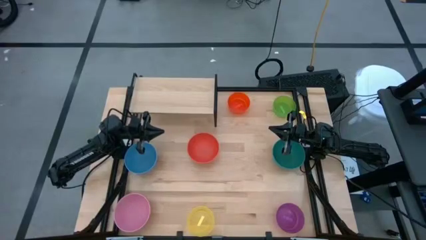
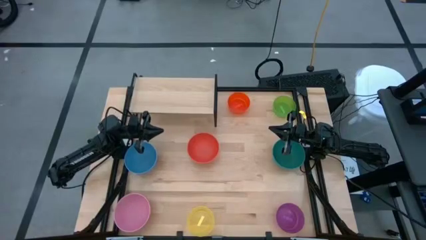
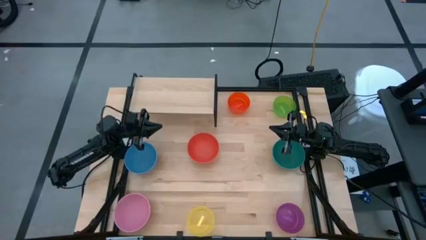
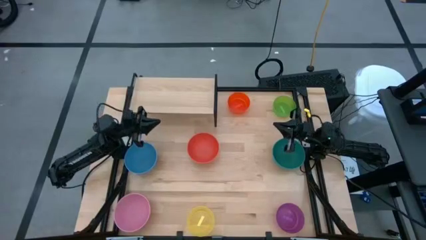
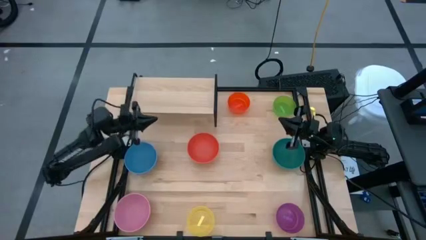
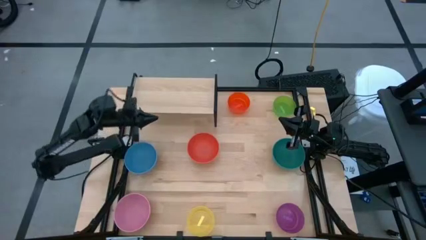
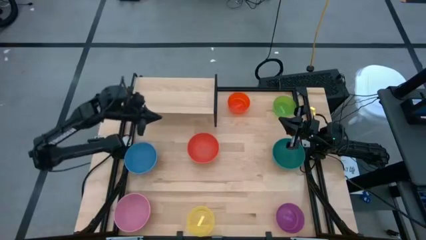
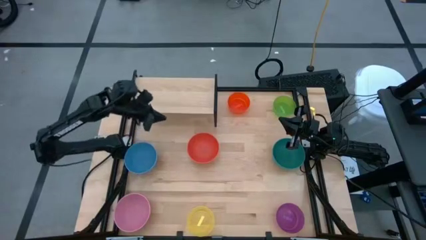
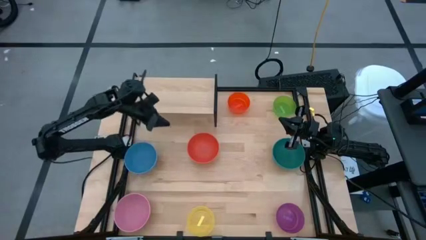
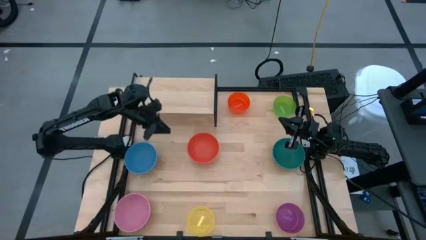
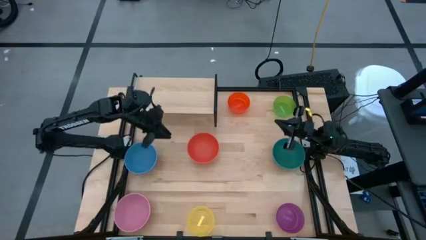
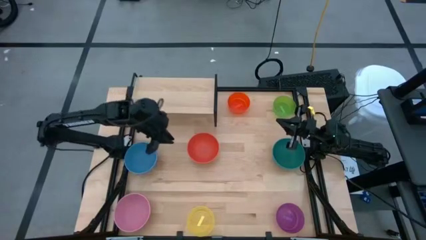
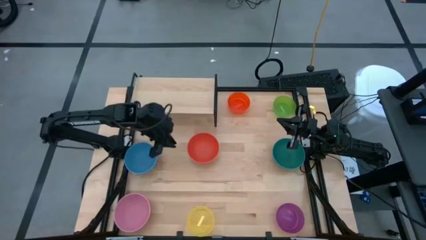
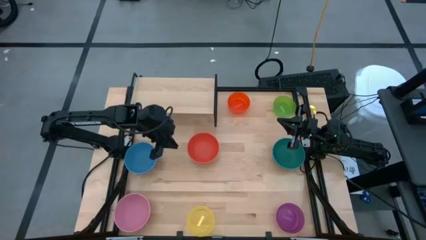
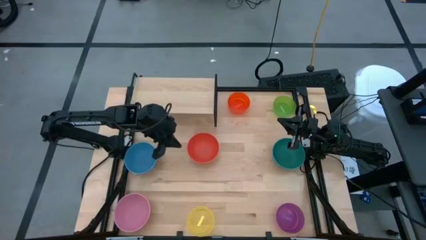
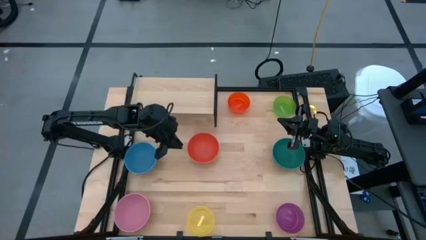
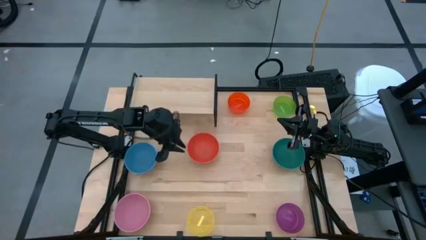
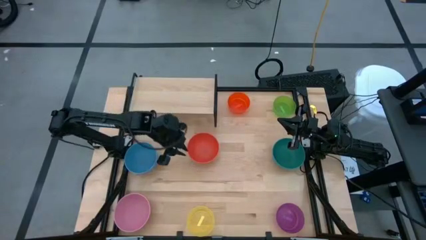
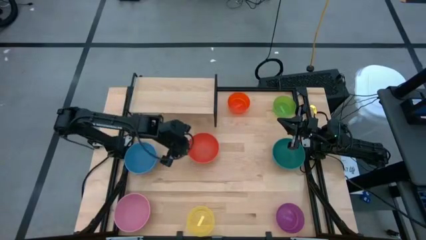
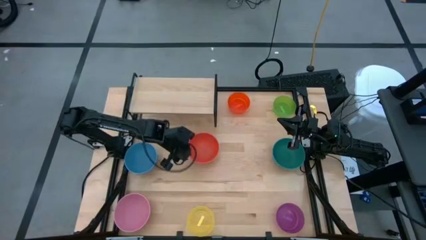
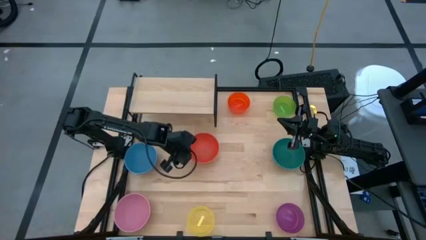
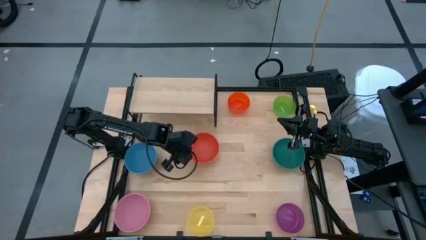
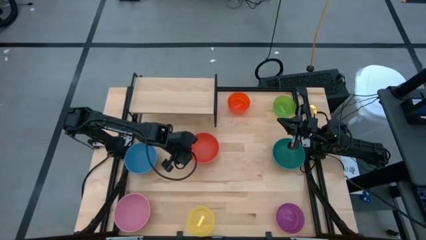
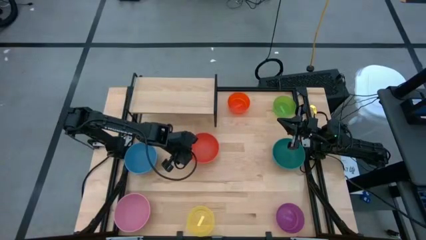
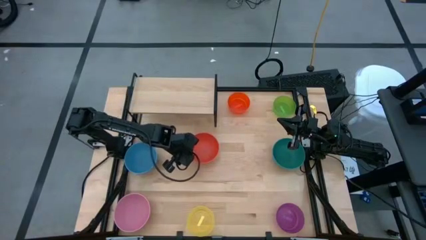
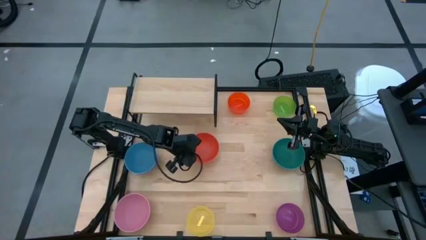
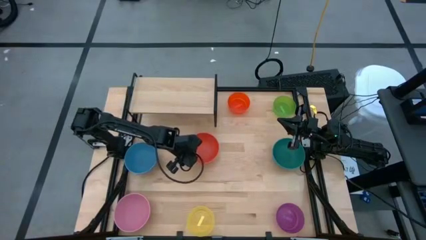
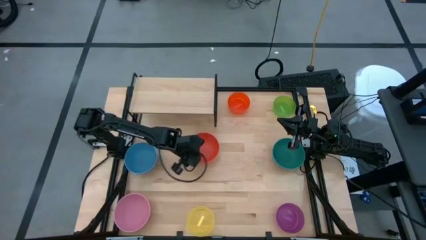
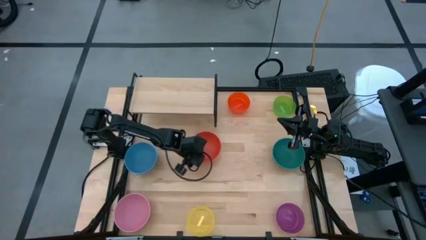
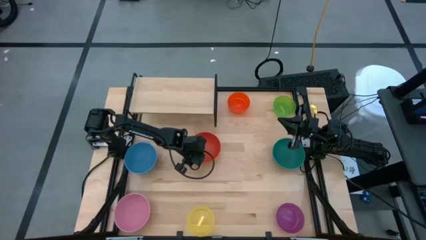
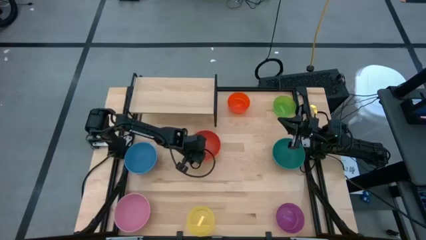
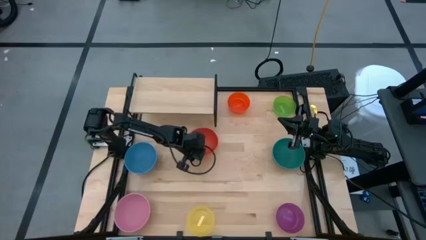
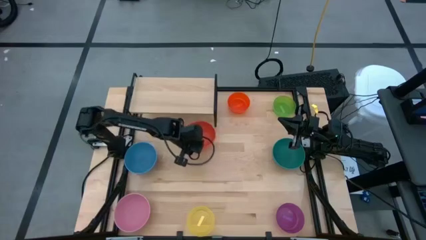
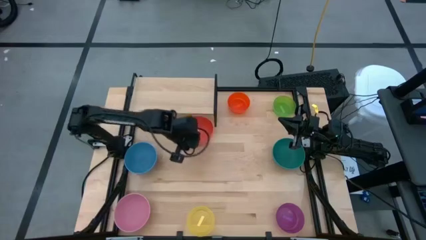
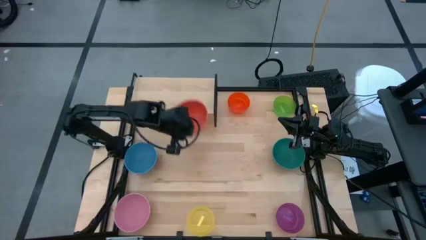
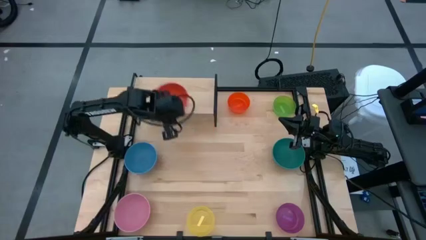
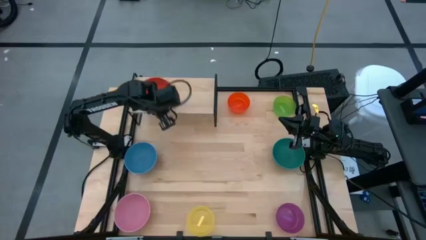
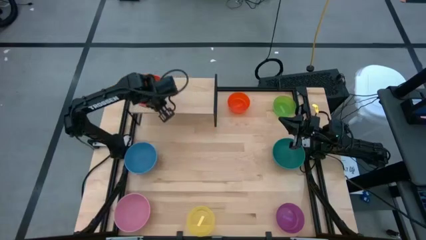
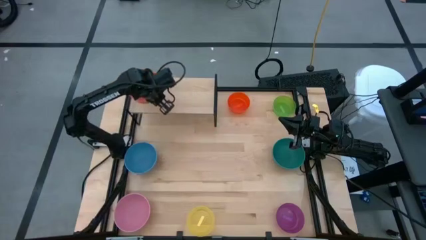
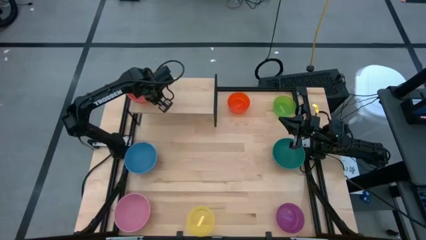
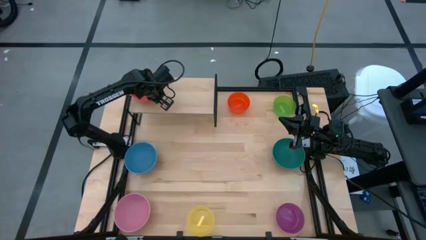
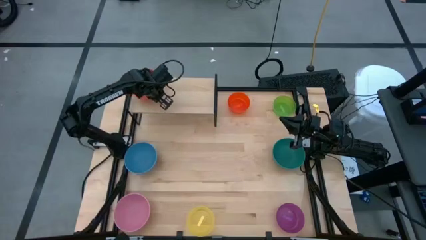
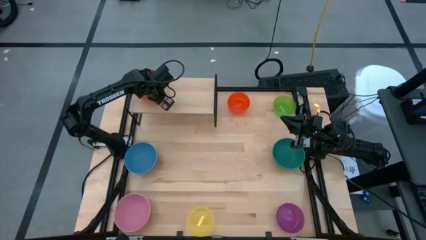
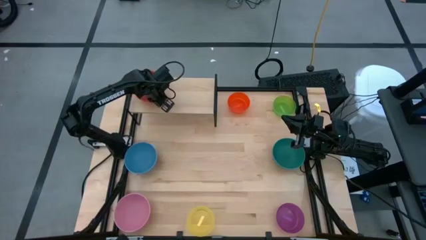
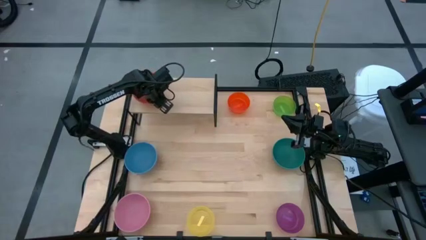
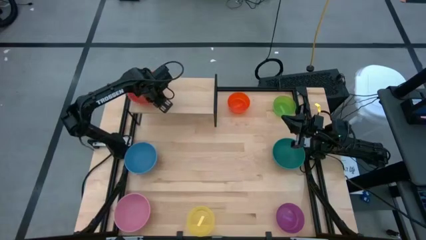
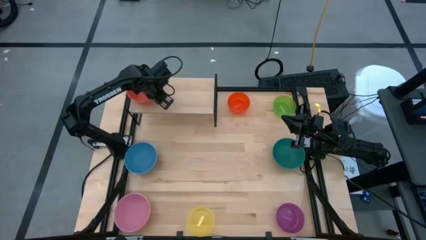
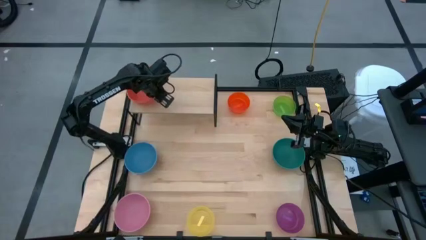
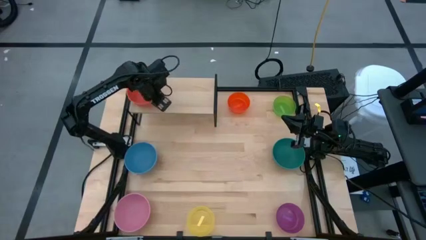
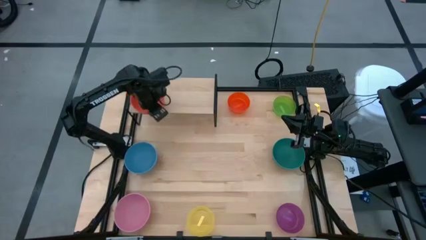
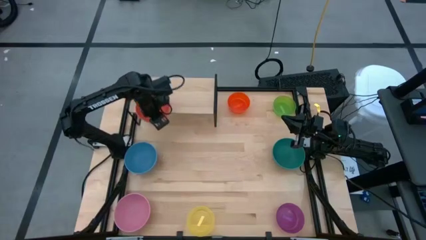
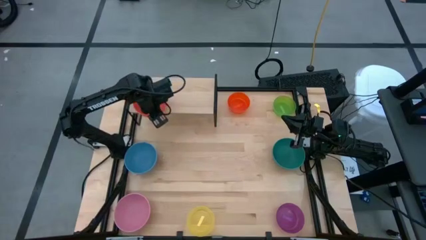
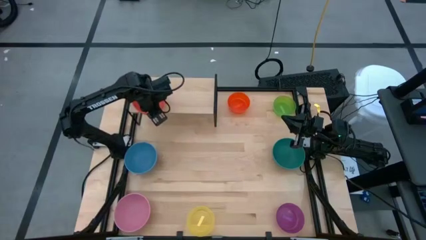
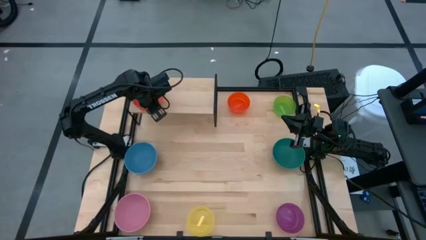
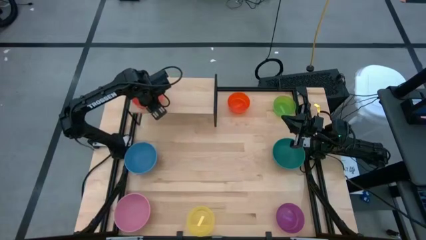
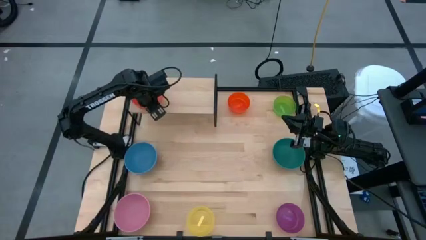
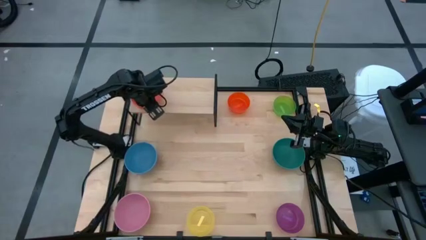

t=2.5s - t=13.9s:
Task: Place and stack bowls onto a shelf
Put the orange bowl on the shelf

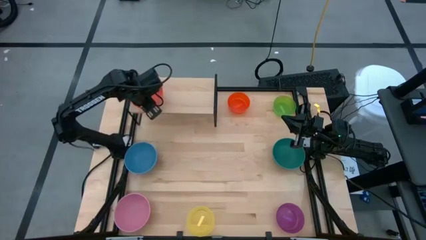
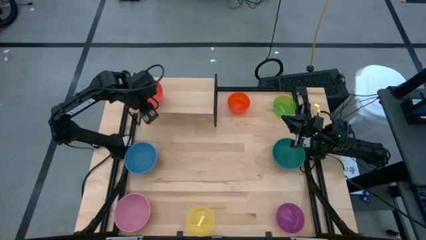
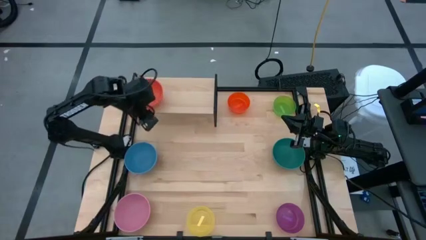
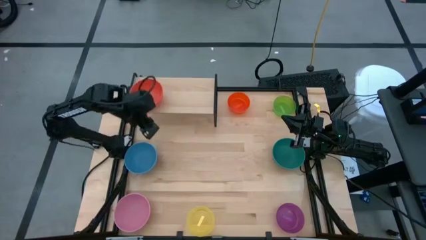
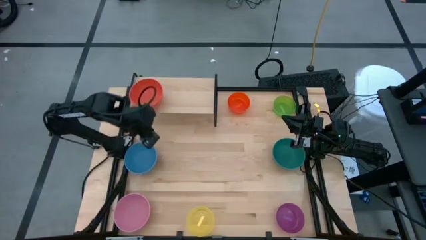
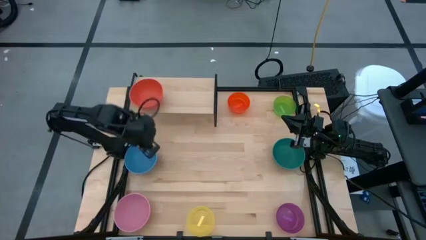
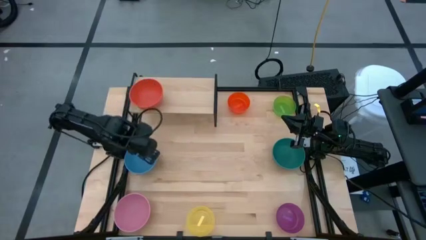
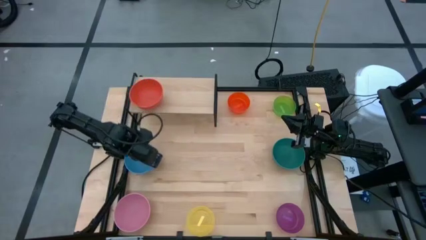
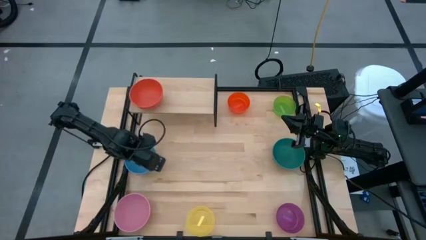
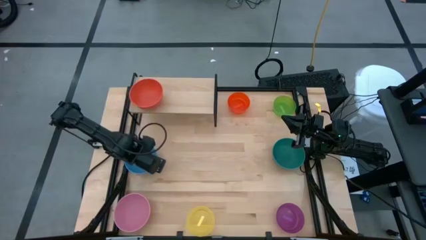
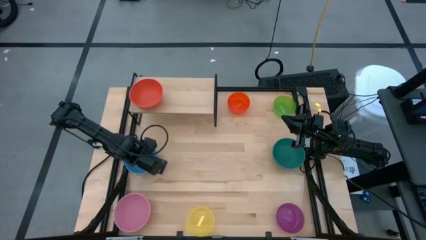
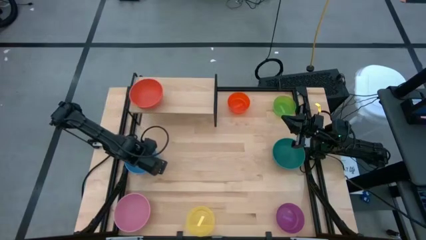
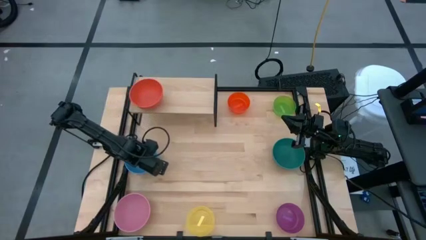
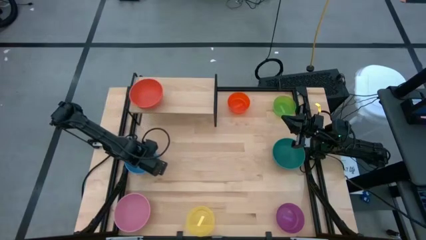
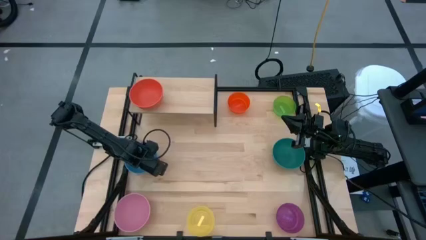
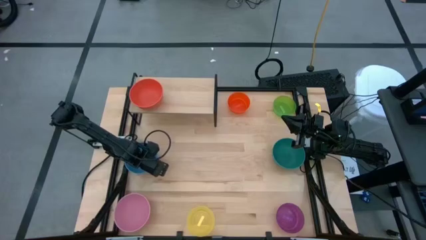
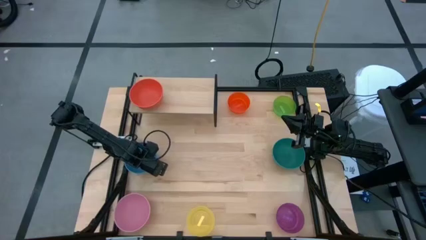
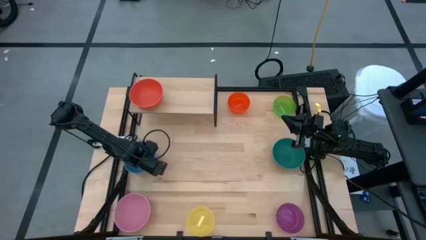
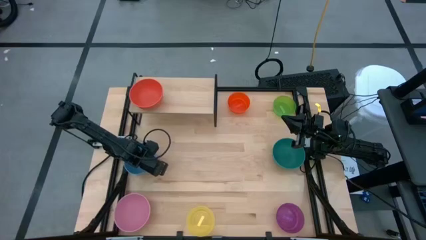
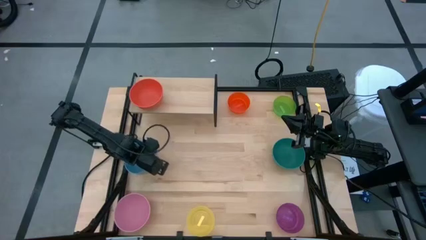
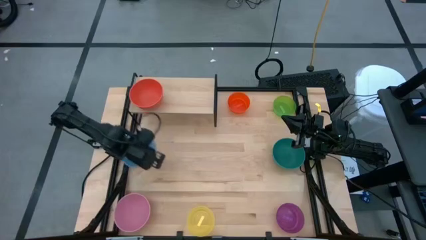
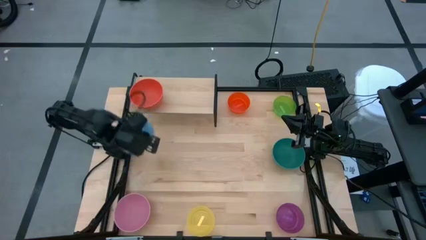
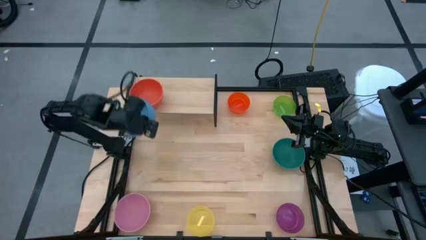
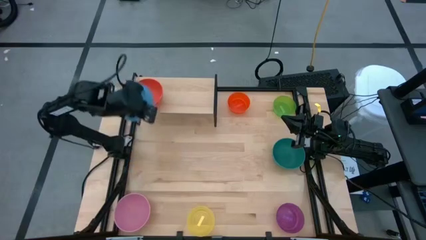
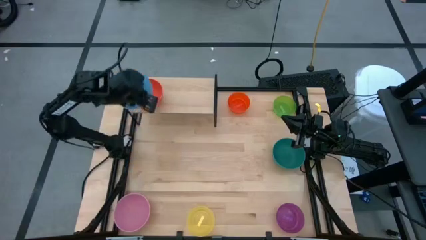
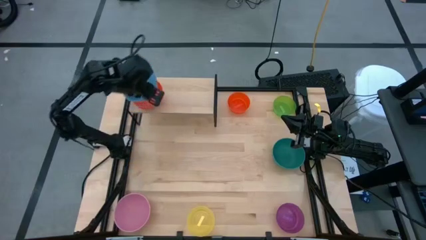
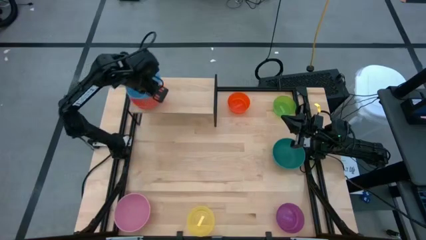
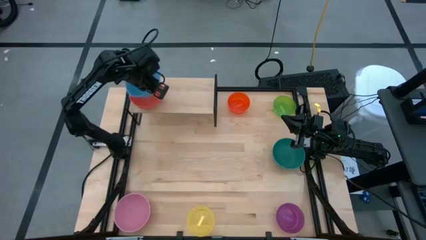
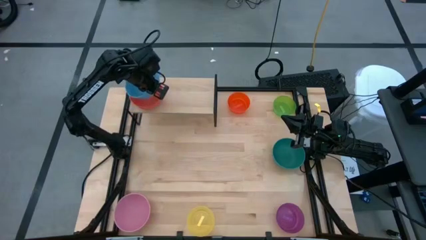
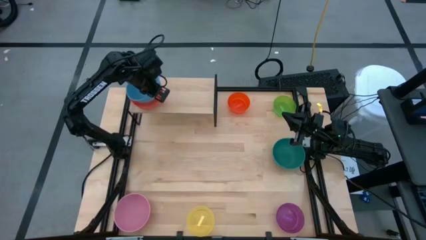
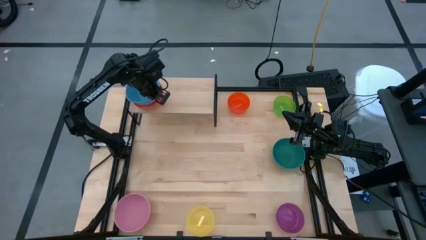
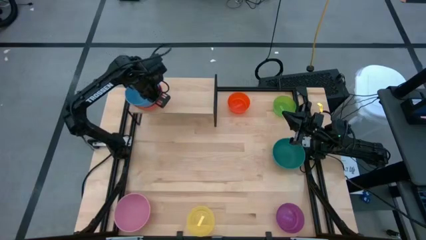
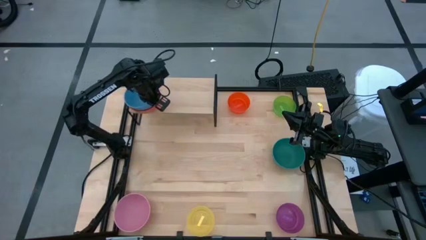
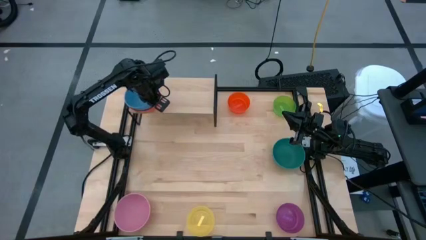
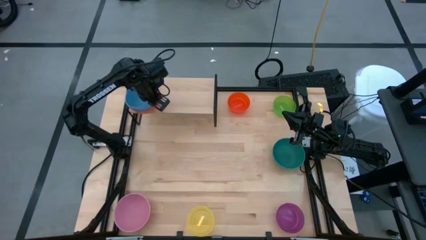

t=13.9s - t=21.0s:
Stack the blue bowl on top of the orange bowl on the shelf
